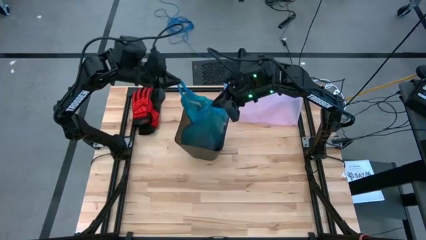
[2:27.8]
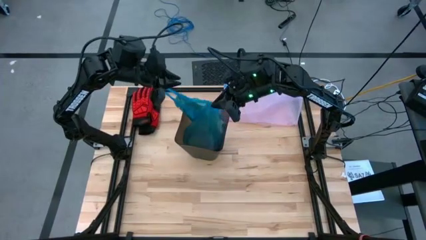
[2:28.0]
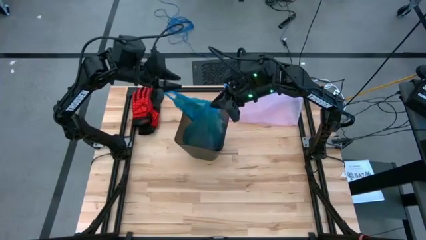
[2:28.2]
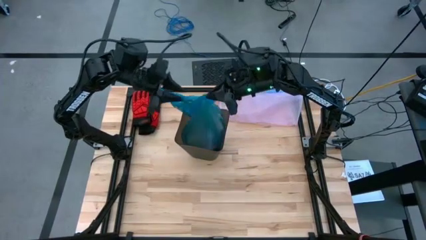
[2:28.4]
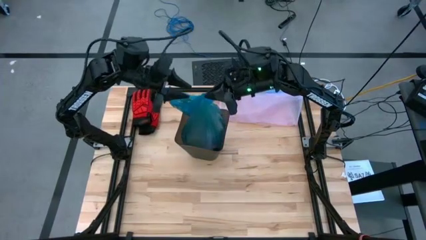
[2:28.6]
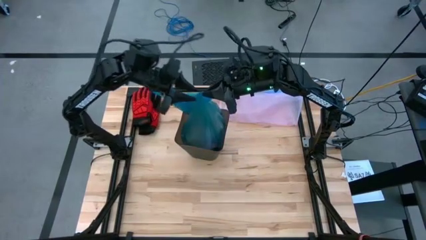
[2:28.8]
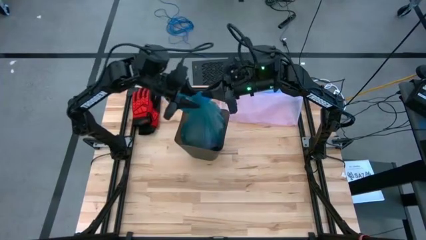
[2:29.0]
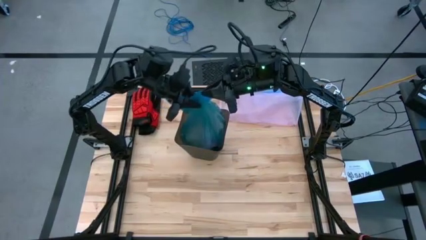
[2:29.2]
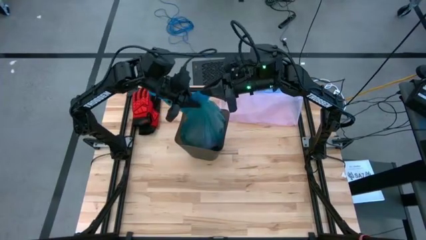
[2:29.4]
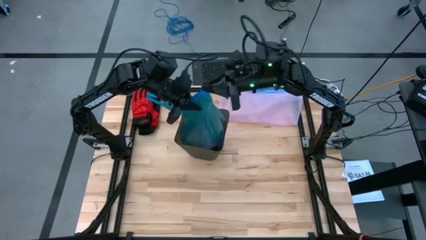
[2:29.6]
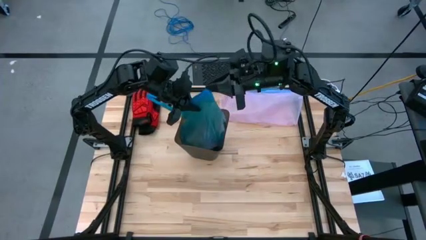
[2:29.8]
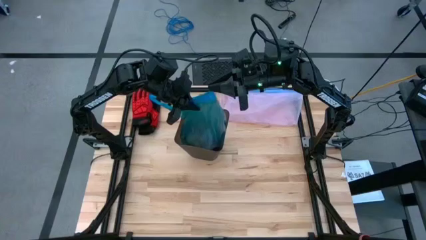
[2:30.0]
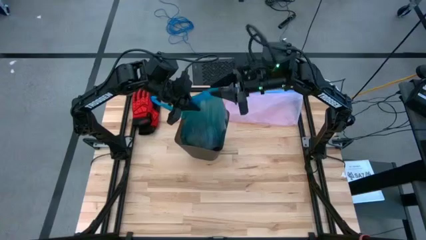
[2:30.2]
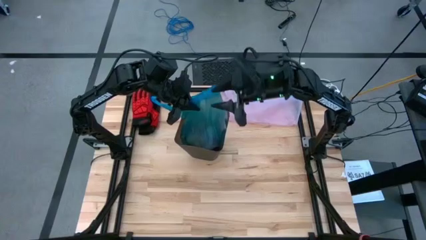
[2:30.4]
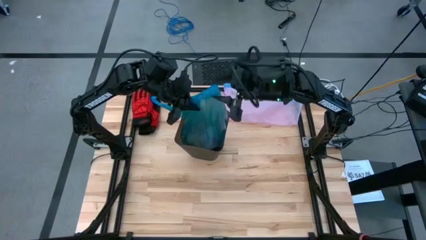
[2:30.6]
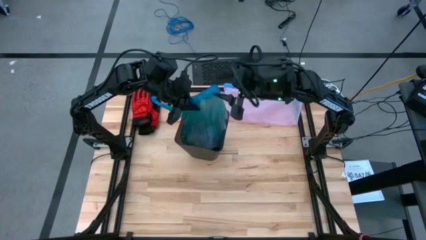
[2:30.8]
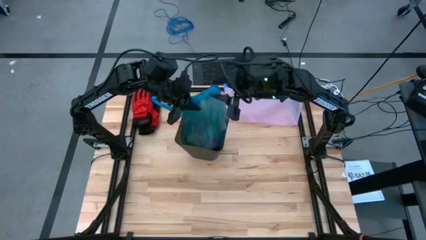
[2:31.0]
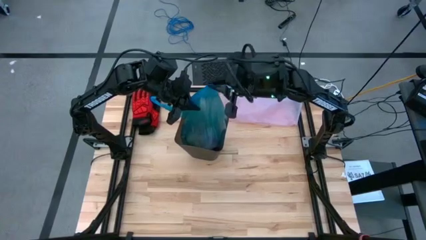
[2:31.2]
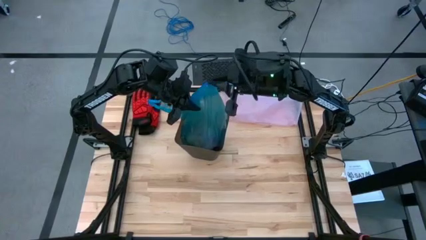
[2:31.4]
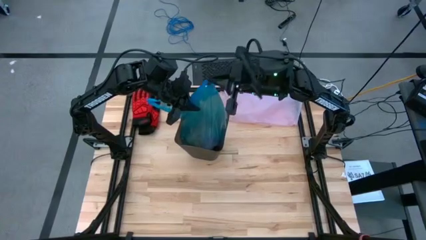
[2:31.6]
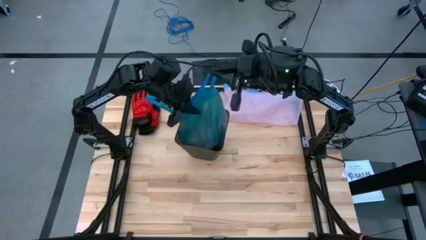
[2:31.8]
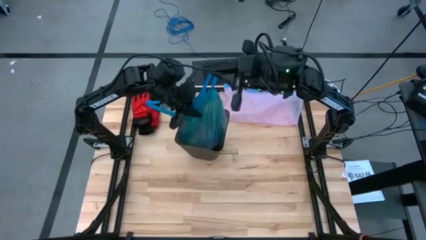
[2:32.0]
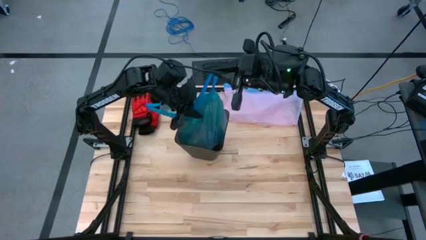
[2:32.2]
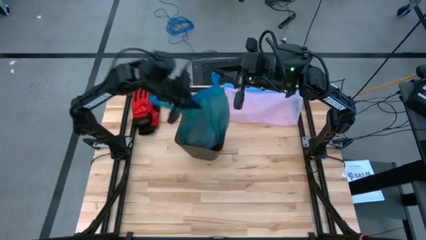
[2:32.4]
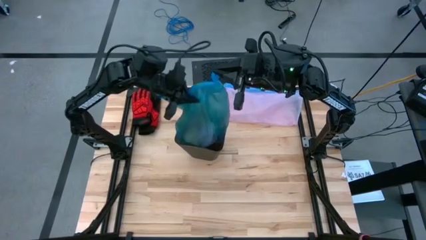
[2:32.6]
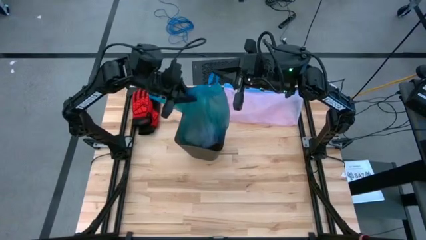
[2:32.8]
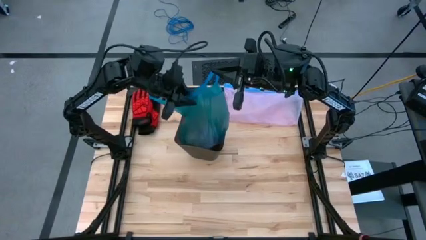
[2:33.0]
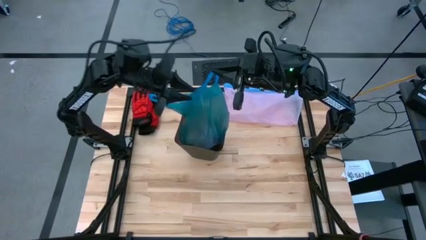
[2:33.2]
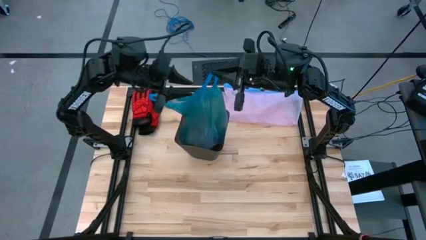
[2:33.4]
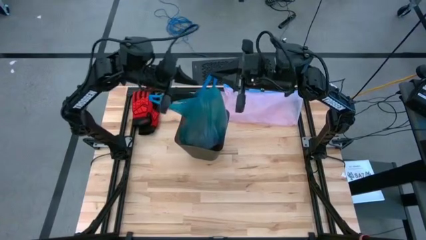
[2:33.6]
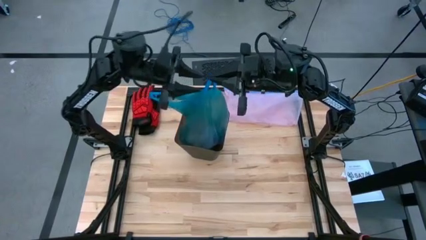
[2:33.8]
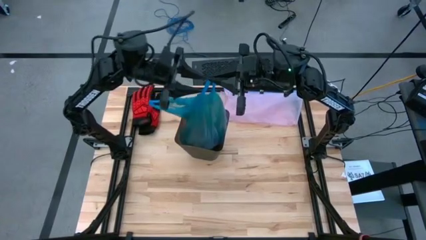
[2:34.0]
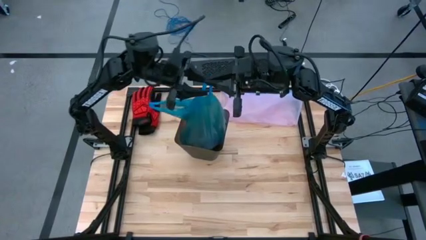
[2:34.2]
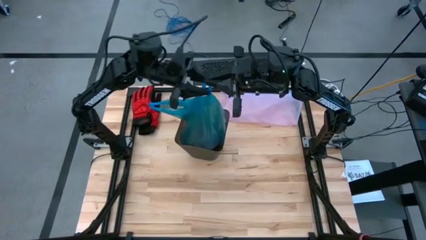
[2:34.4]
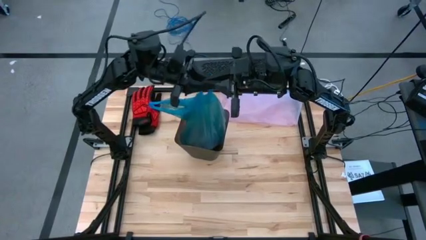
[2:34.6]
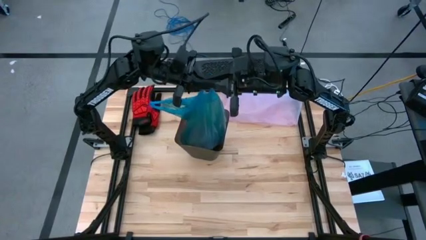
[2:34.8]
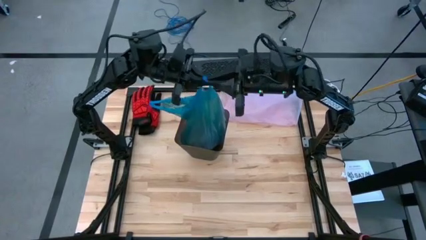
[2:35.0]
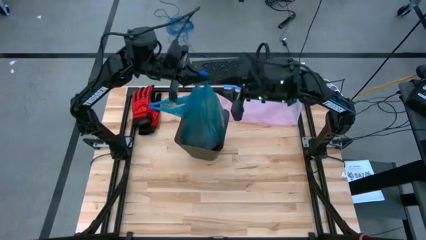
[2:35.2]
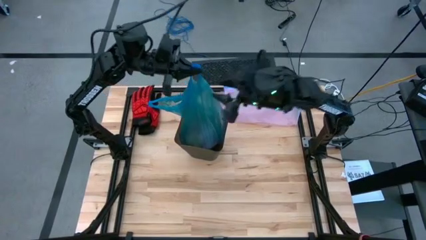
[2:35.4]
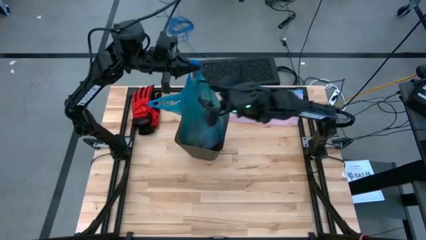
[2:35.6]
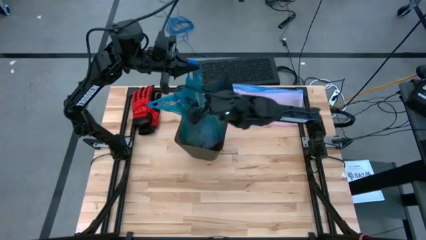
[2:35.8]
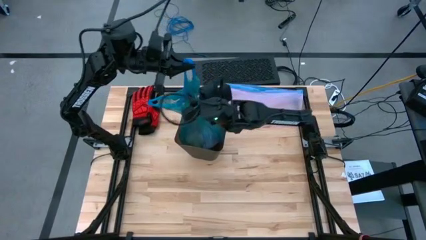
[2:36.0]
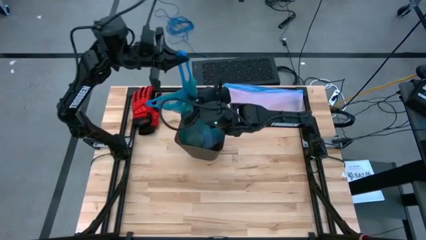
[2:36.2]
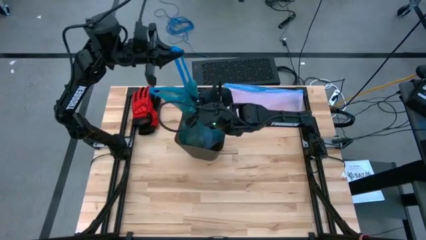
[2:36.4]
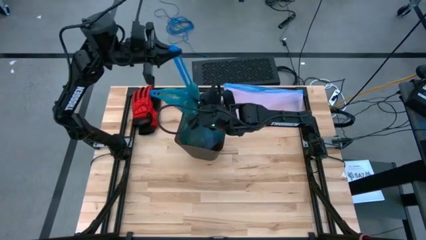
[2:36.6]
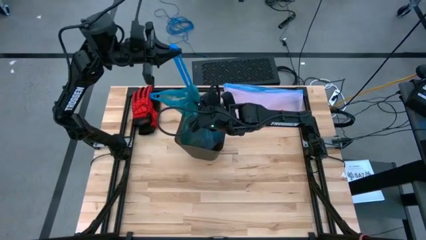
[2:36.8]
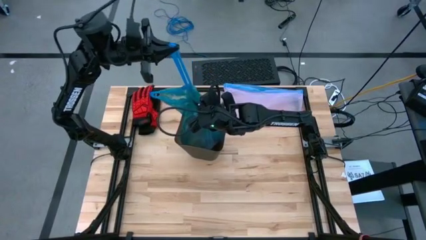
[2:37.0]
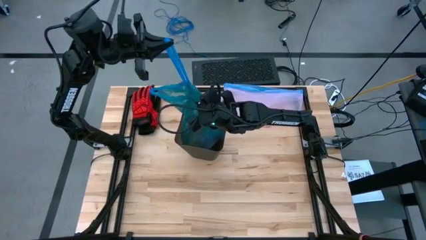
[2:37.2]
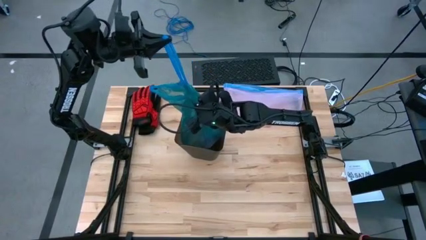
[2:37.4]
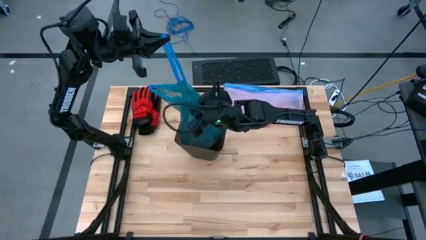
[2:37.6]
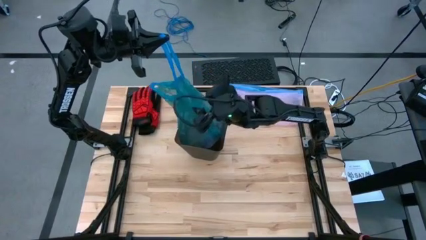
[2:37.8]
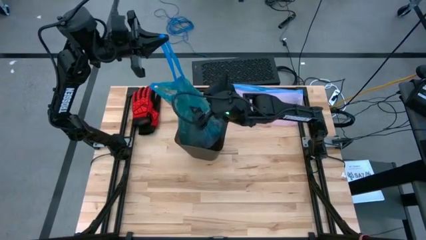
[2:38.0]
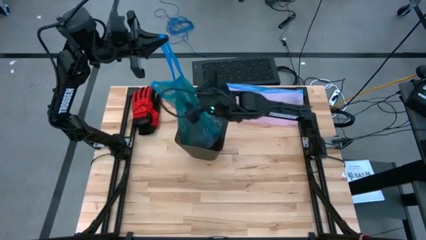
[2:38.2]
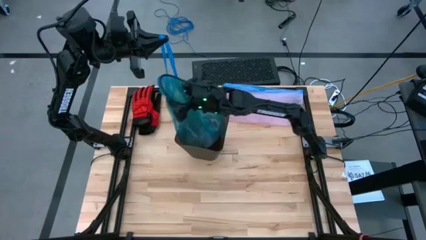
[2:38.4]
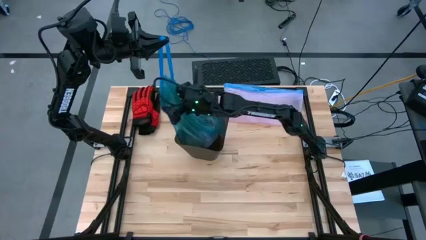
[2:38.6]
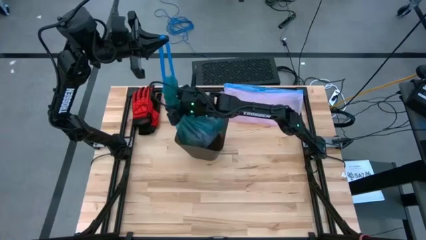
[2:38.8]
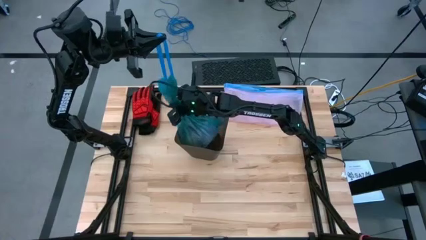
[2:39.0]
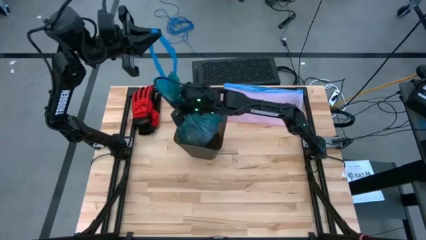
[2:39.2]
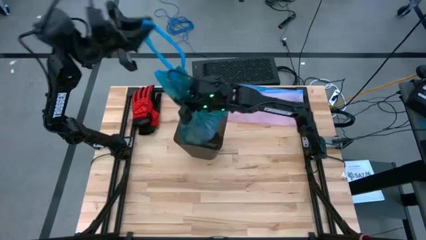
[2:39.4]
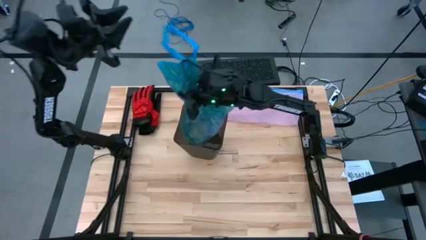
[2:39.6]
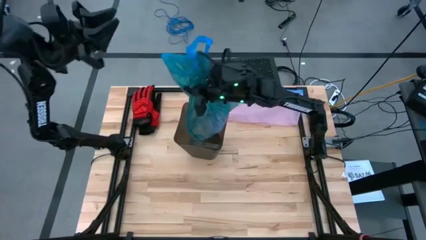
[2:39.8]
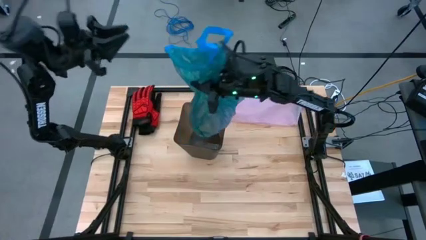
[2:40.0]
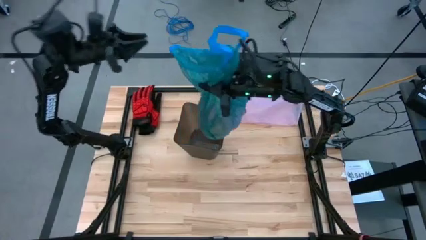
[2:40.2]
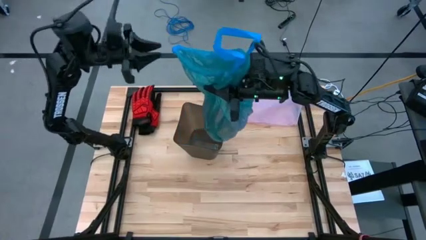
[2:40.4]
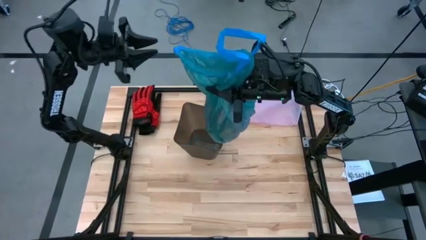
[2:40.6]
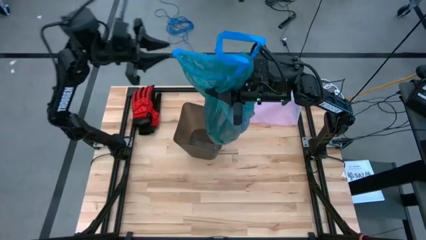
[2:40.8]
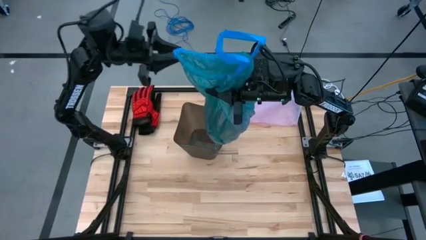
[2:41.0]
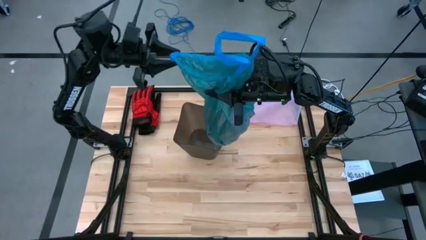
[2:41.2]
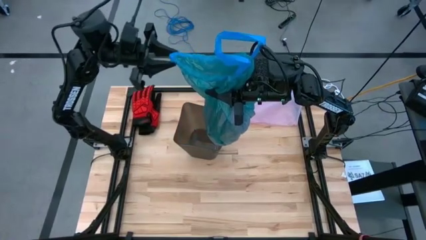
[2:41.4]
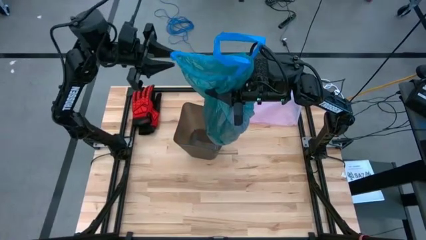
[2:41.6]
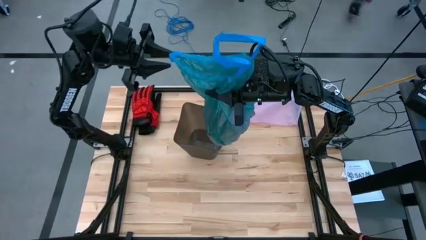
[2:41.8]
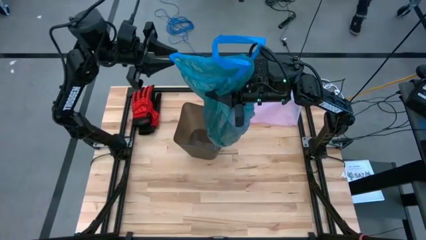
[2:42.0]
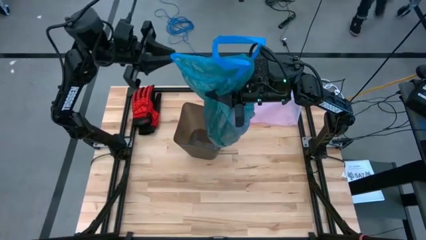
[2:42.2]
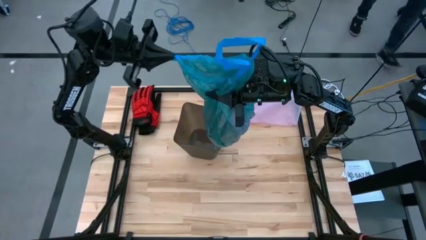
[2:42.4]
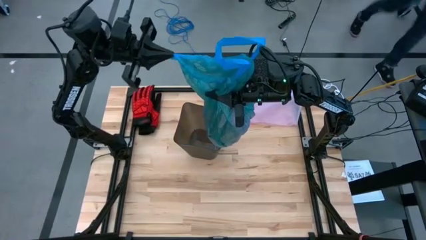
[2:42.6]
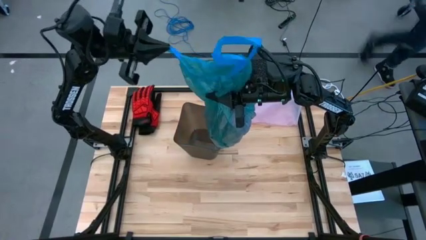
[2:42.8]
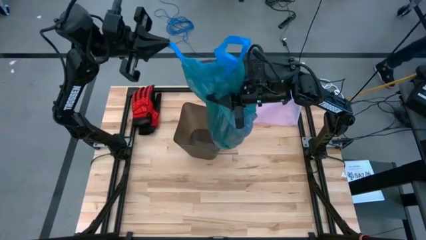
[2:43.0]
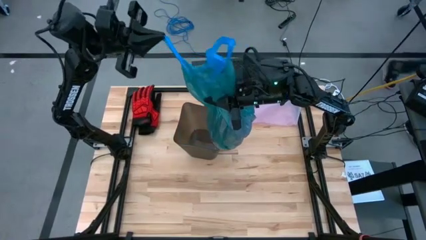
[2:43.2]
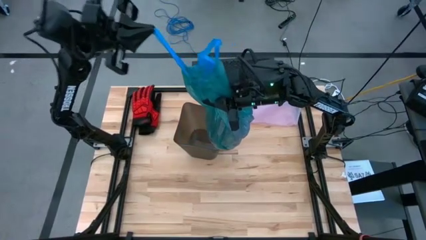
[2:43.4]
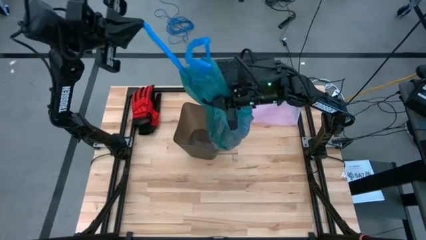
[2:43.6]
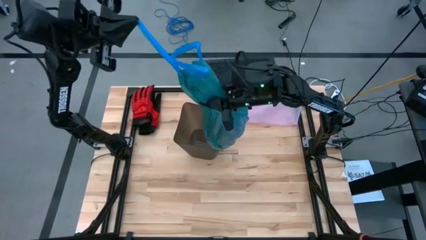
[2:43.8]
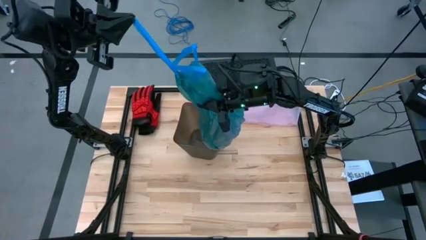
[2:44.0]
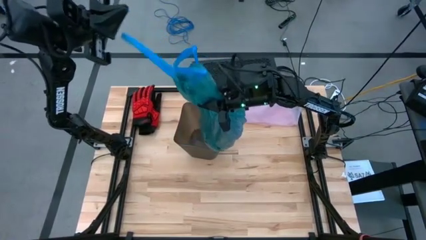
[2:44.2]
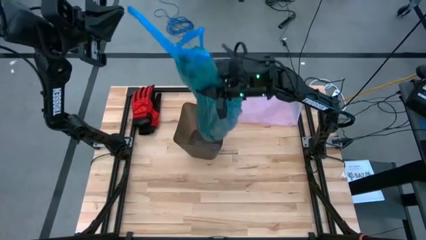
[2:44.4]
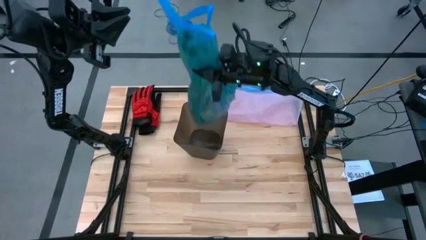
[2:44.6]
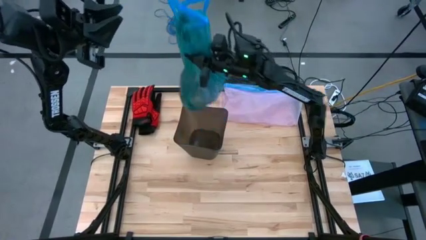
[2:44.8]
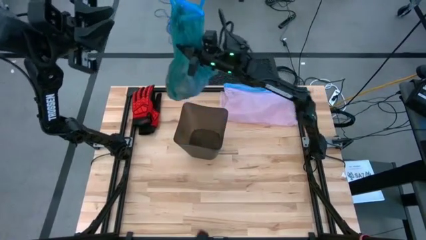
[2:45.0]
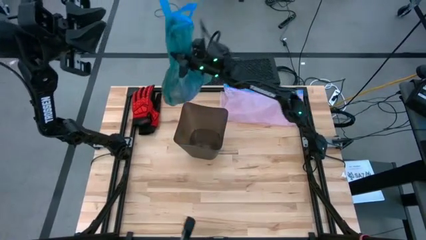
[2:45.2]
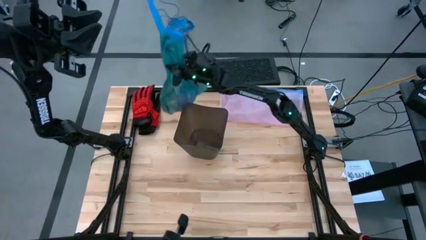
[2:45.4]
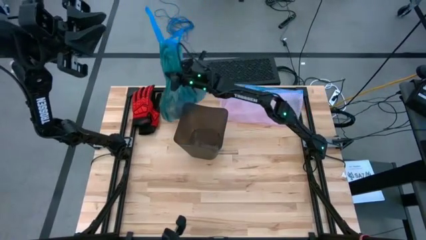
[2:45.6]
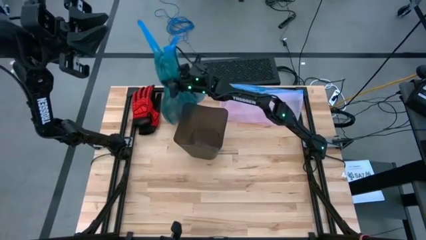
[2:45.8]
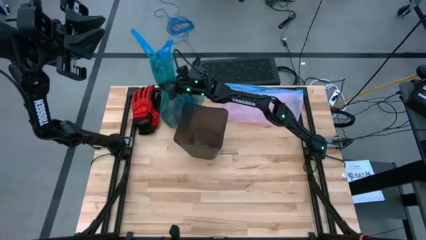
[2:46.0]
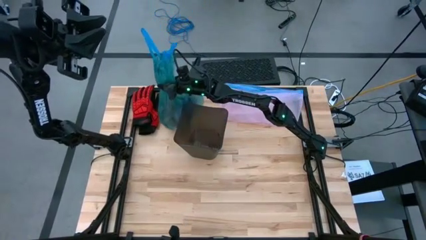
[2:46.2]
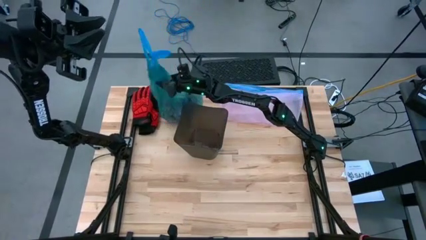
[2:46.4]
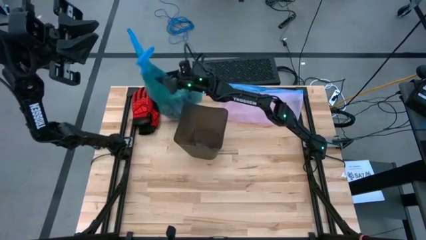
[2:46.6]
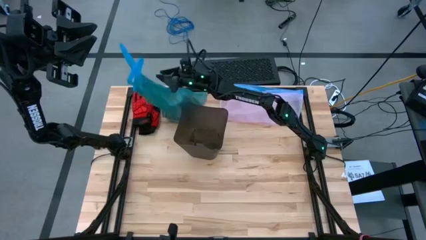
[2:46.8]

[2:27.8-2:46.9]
Task: place trash/remove bag and relplace
Remove the blue trash bag from the black trash bin
